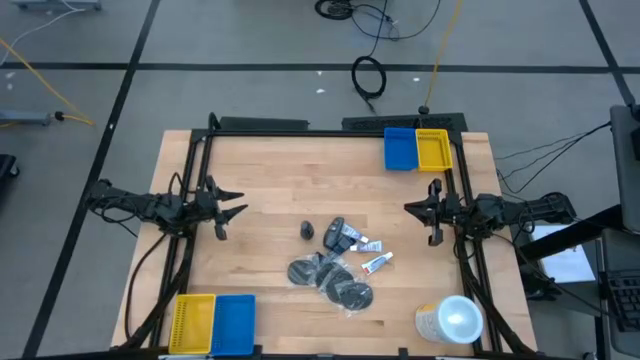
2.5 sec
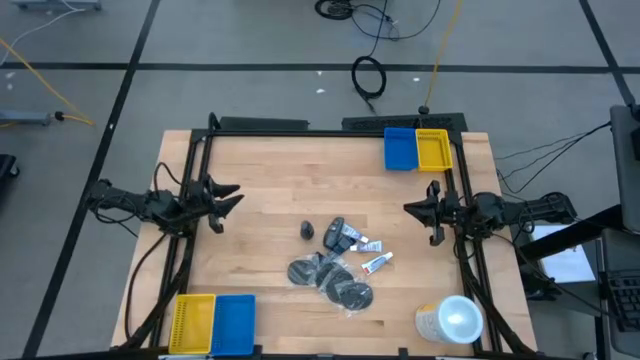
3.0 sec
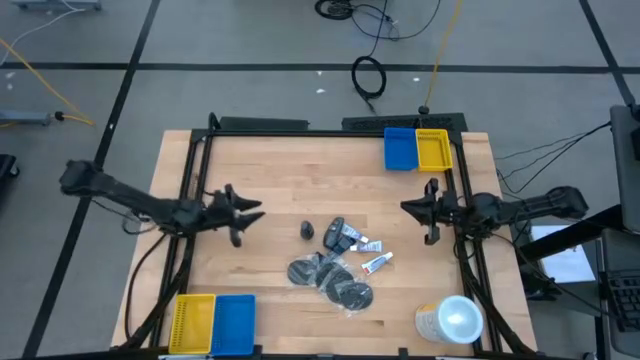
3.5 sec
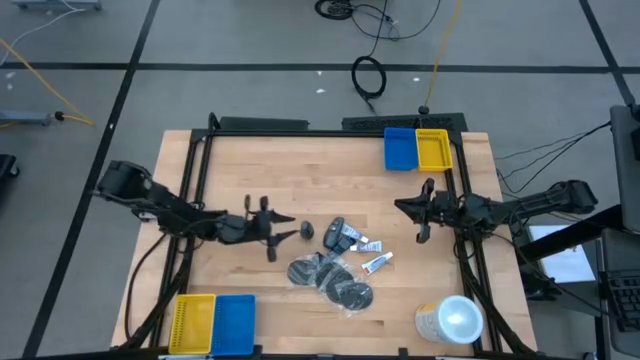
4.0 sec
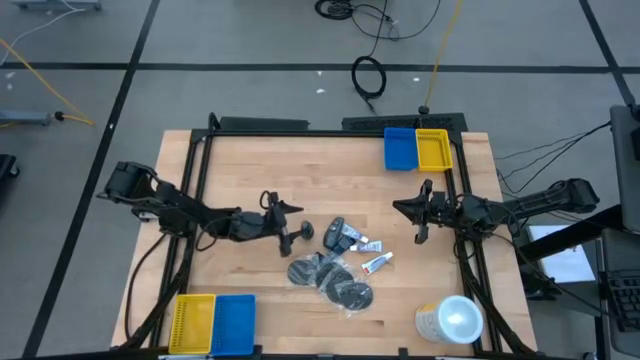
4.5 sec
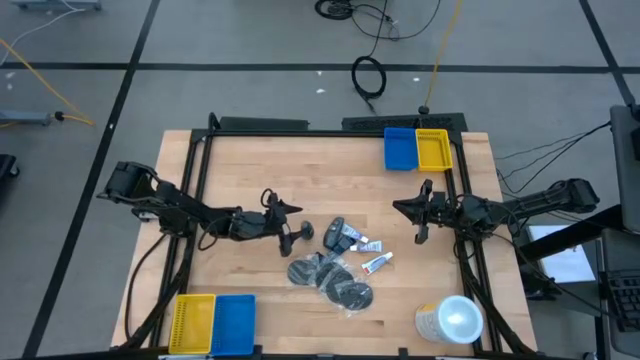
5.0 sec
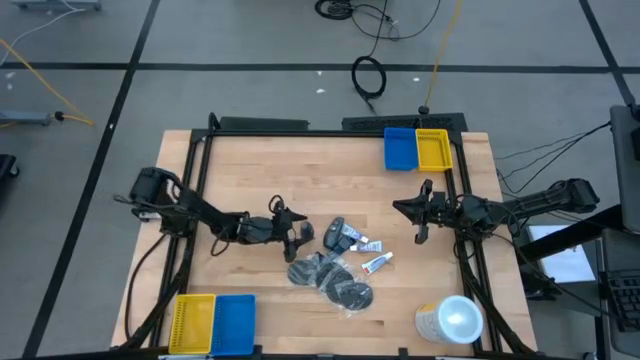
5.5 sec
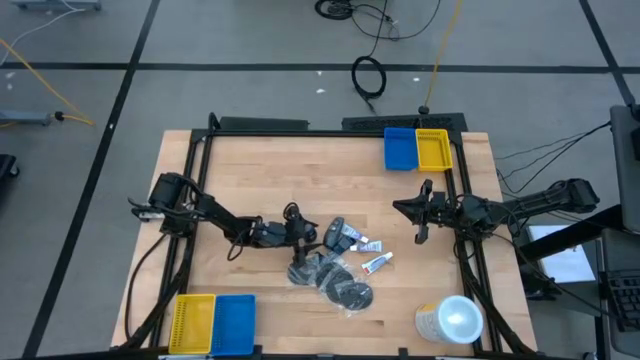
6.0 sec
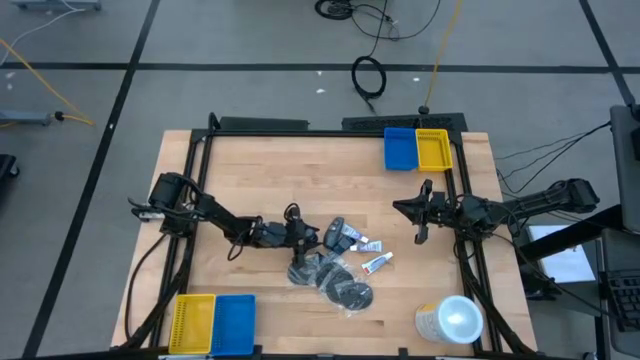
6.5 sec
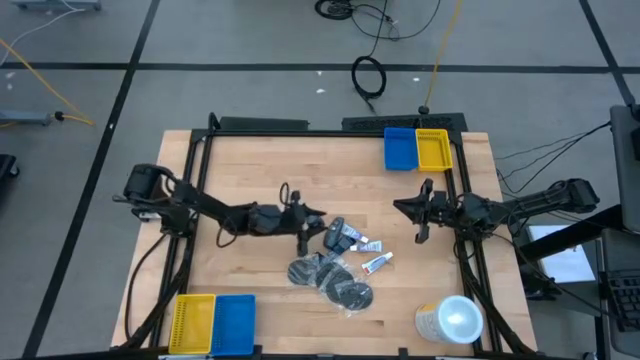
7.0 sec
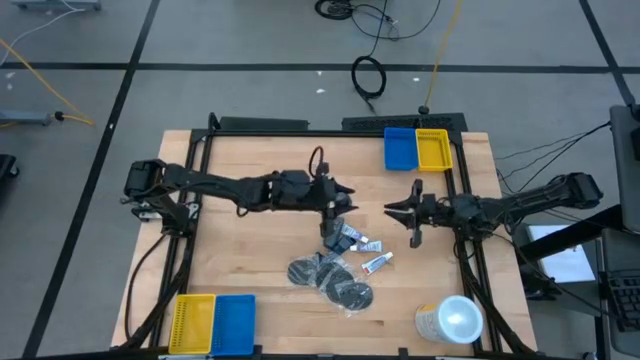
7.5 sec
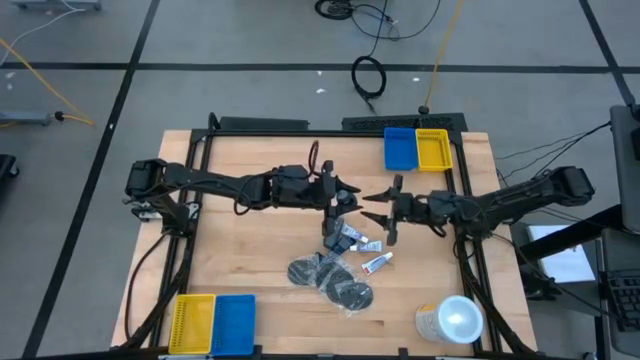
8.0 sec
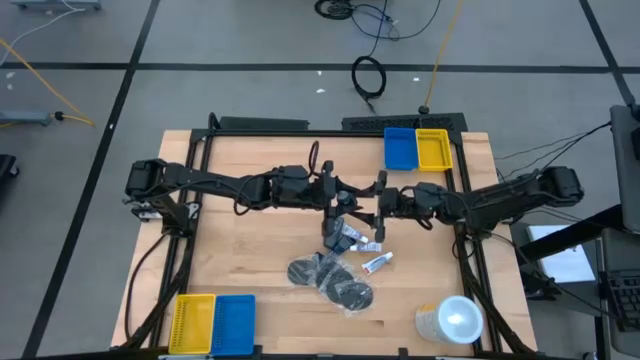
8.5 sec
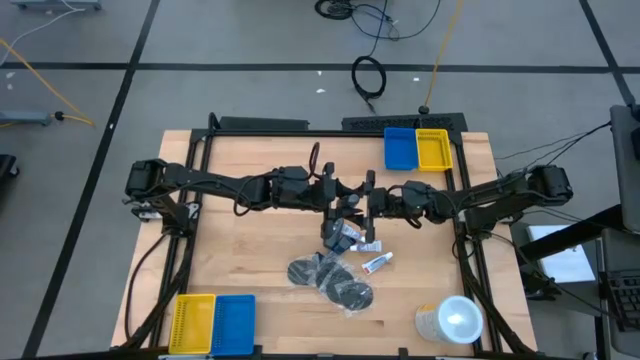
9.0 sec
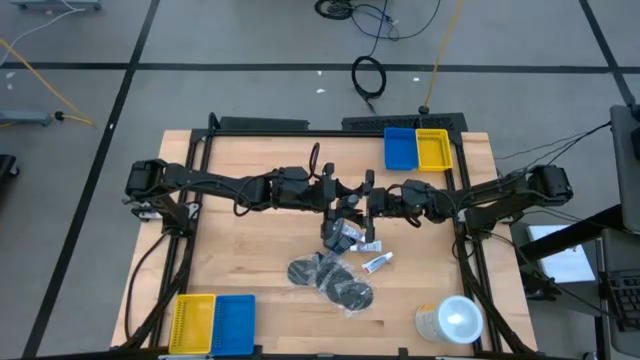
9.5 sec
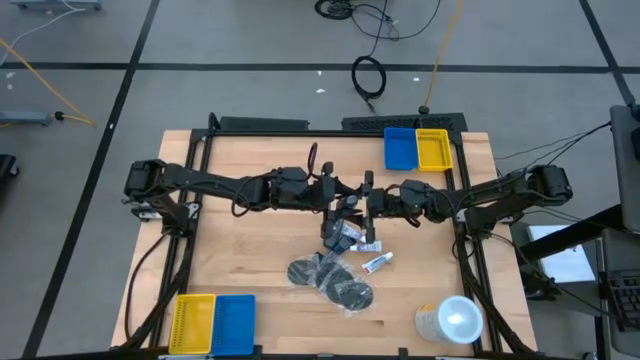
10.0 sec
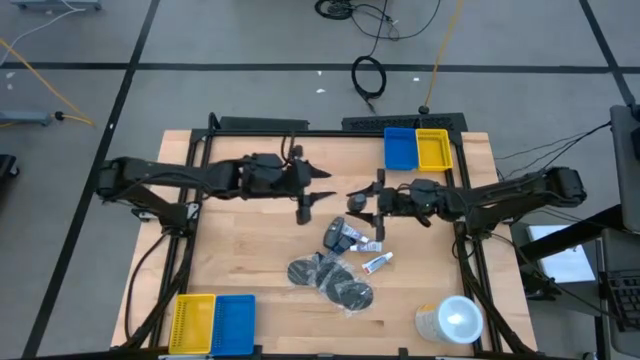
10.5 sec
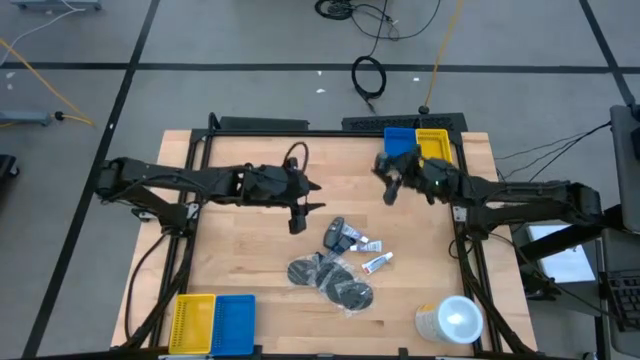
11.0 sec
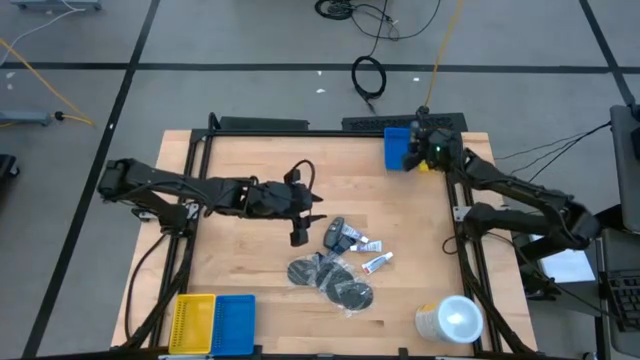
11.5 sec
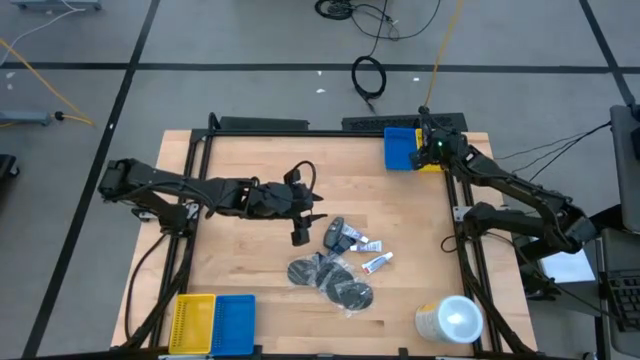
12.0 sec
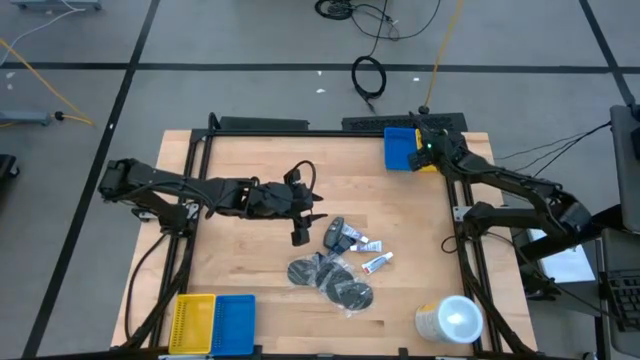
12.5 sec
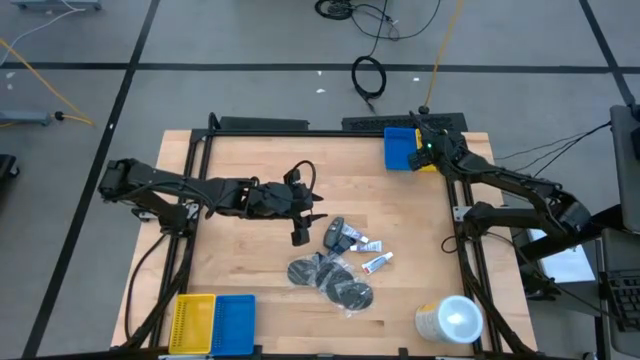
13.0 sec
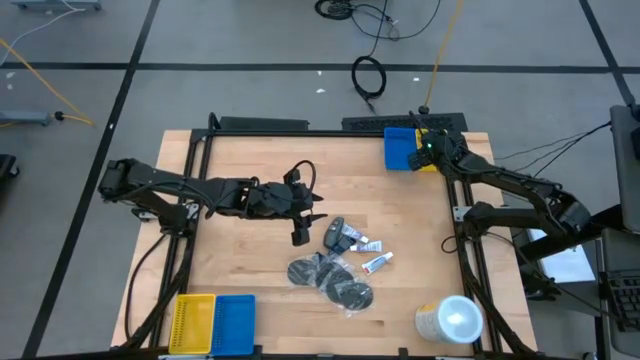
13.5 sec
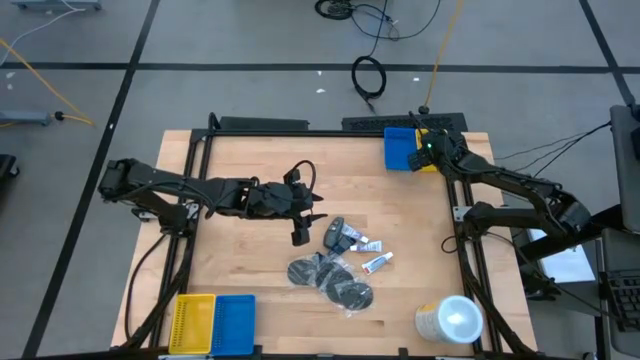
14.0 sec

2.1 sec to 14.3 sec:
Task: Pick & Place Travel size toiletries
Put the black deodorant into the top yellow bin

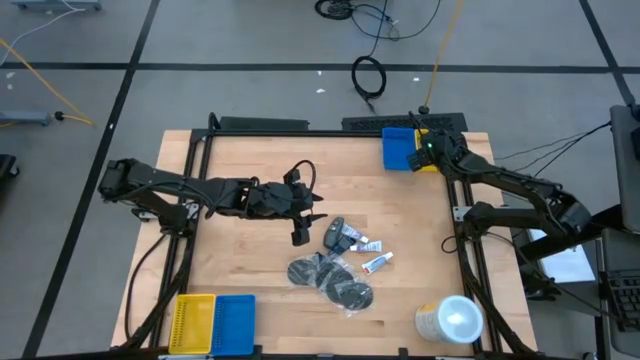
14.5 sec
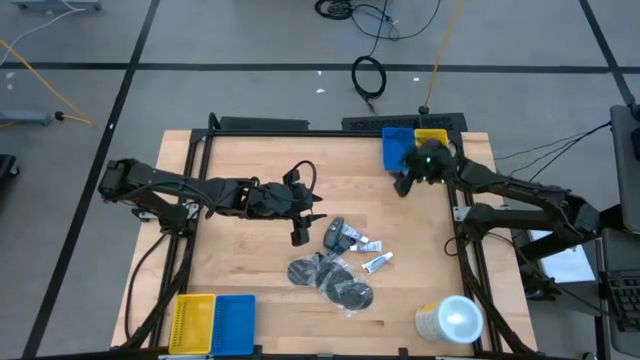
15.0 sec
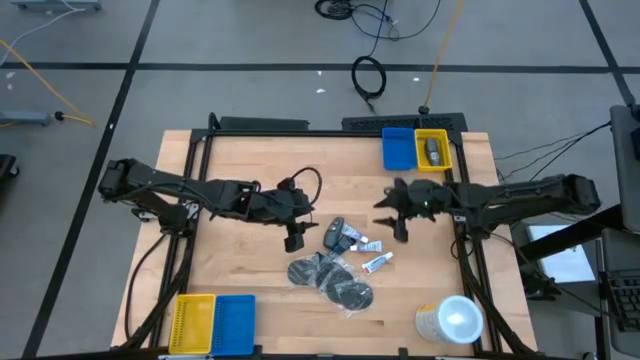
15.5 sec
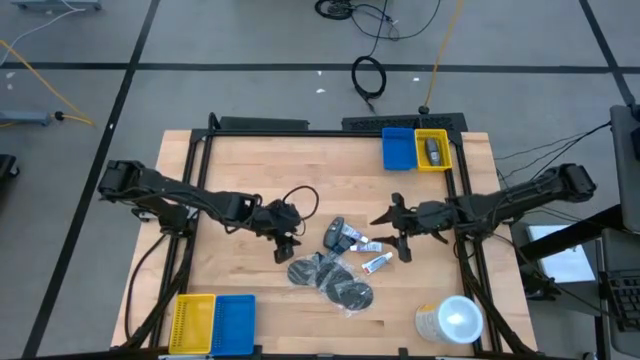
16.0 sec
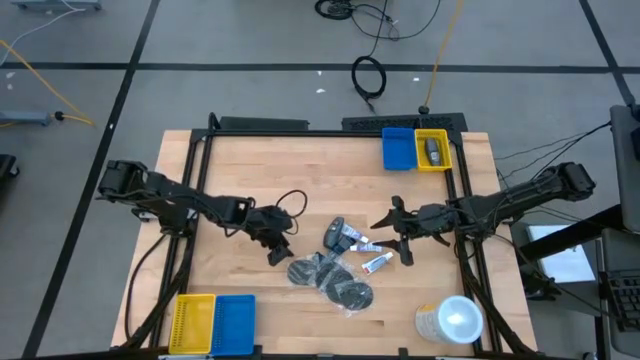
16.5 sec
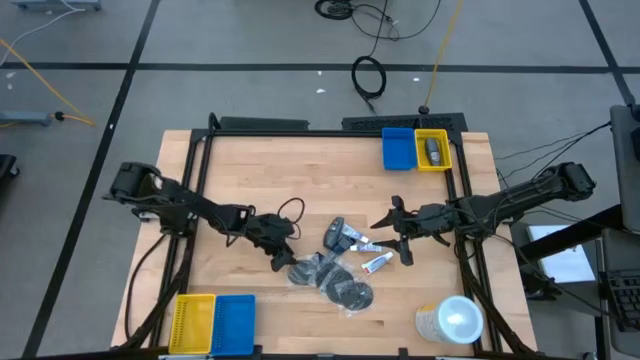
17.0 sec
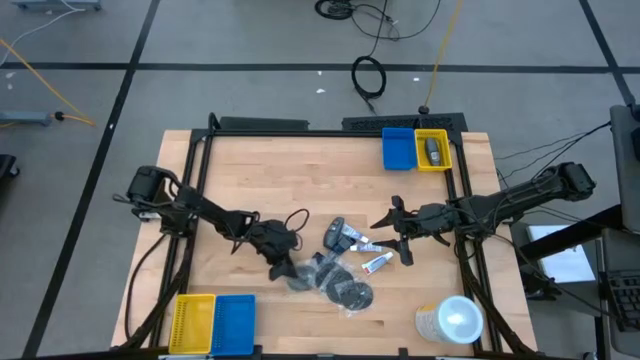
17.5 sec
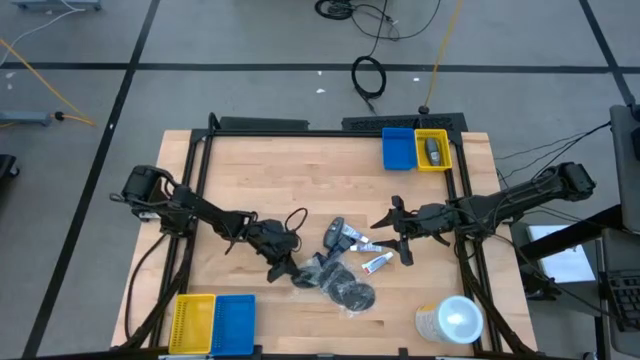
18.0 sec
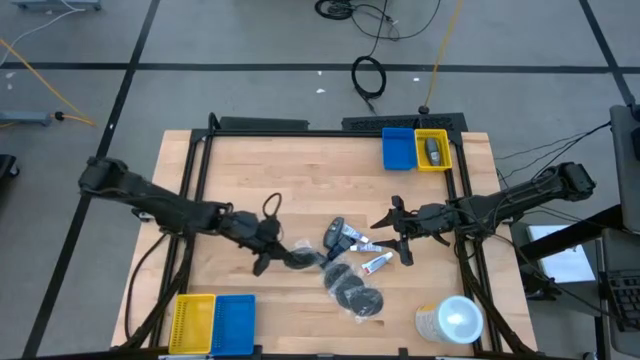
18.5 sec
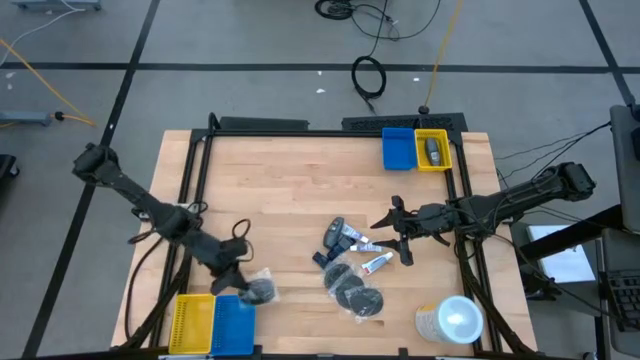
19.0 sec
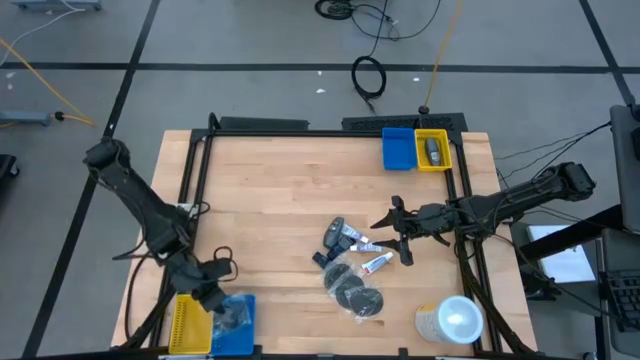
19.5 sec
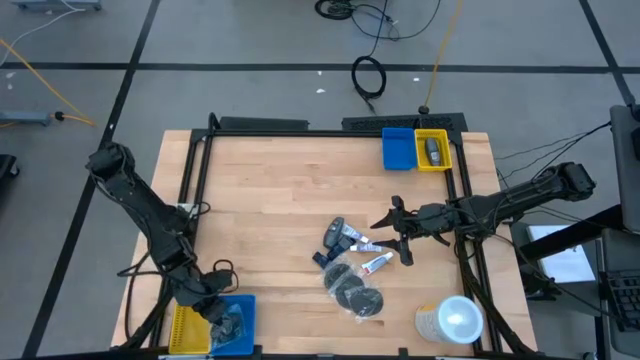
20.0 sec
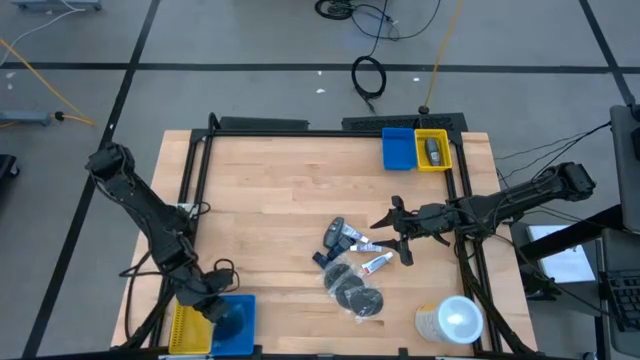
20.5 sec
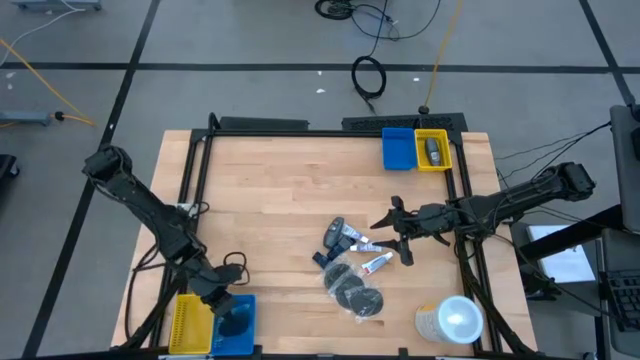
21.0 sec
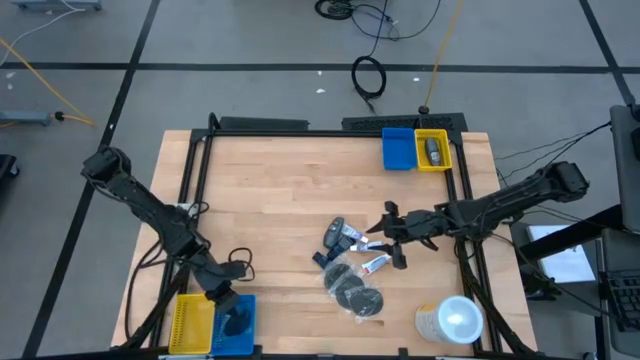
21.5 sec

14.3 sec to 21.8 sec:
Put the black hairbrush into the bottom blue bin

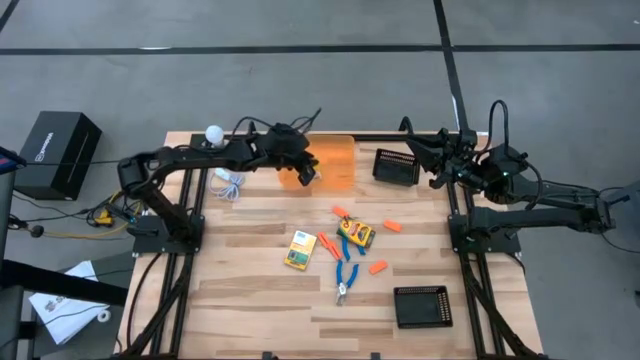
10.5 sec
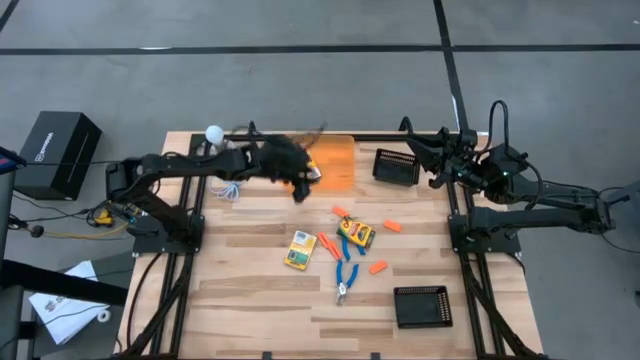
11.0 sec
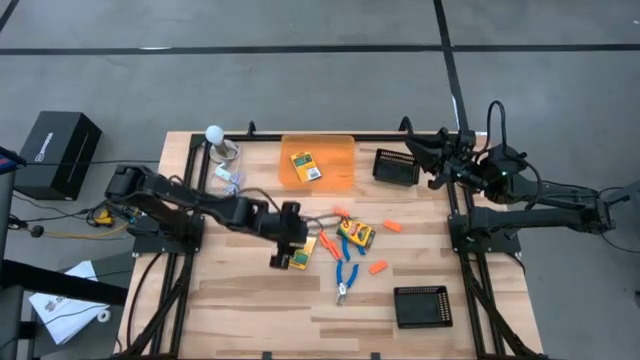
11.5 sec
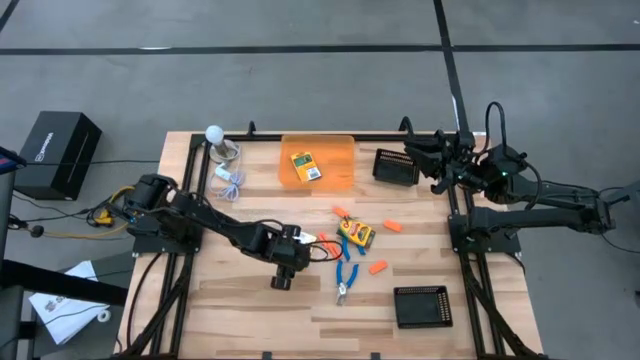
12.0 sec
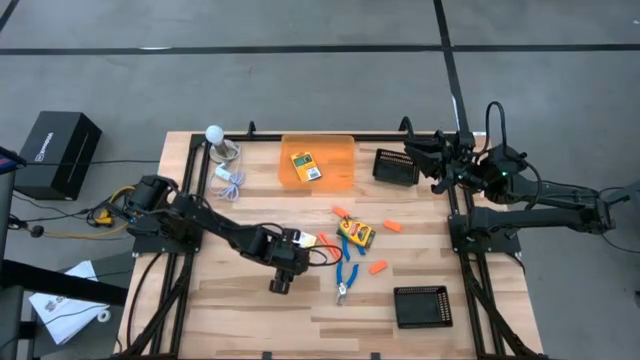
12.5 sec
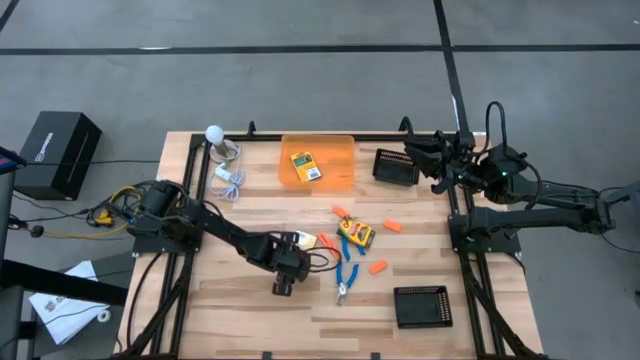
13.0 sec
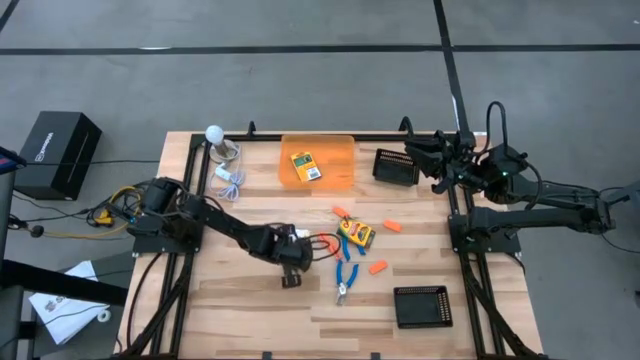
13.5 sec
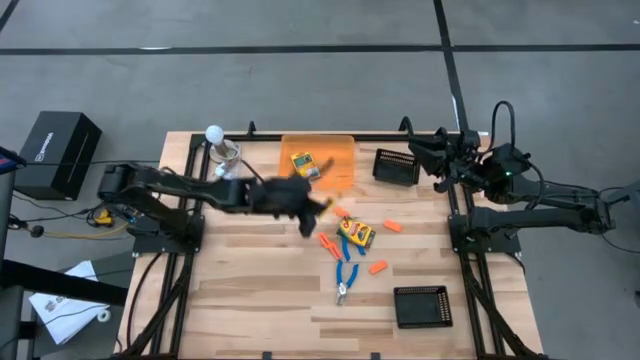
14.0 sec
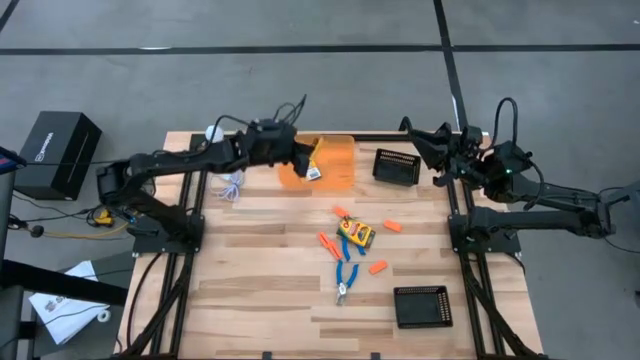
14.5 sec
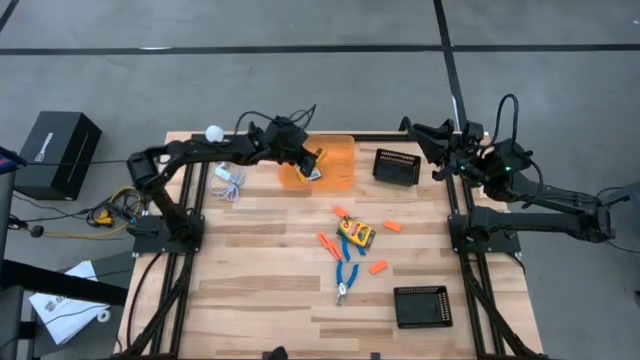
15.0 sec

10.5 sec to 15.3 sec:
Task: Pick & Place School Supplies
Put the yellow crayon box into the orange bin
